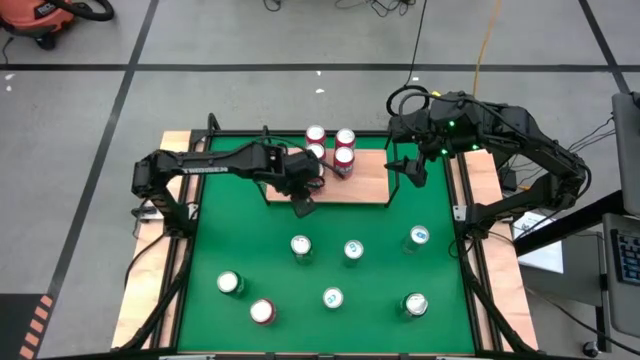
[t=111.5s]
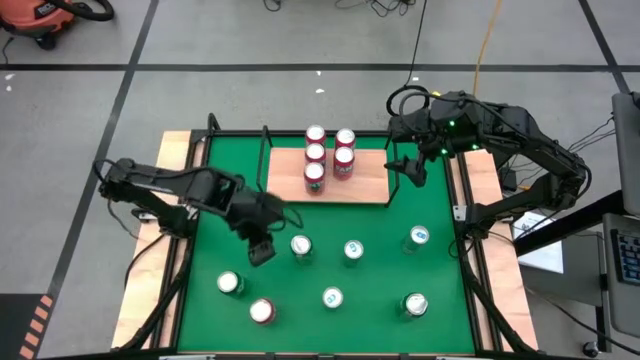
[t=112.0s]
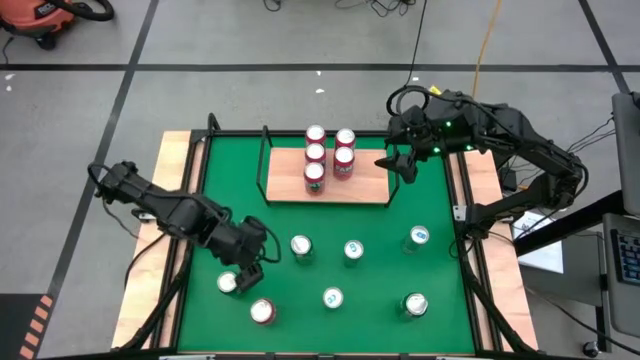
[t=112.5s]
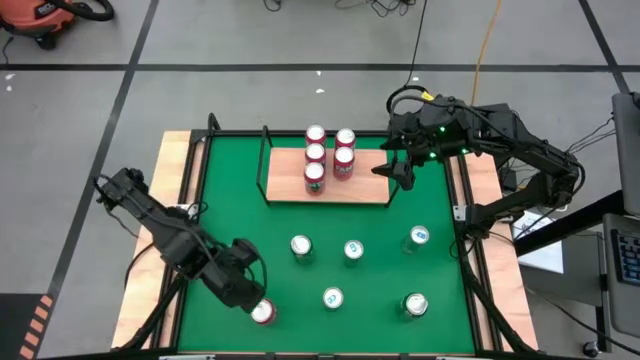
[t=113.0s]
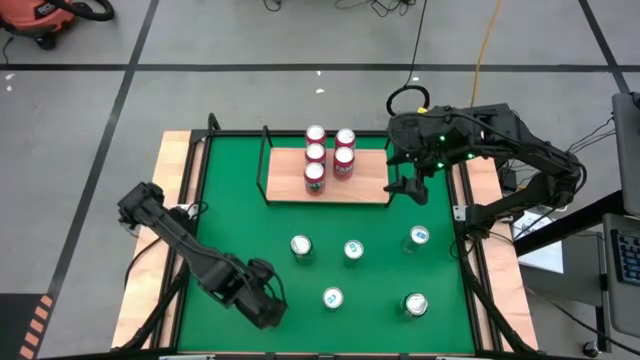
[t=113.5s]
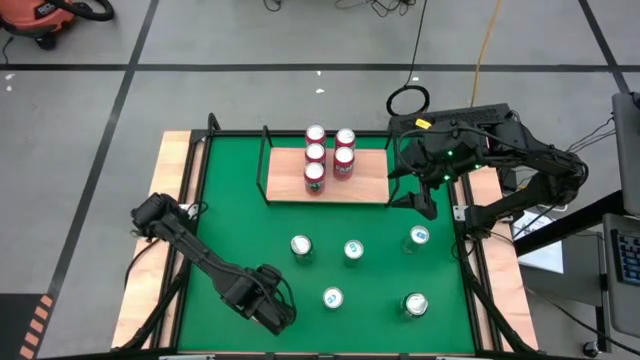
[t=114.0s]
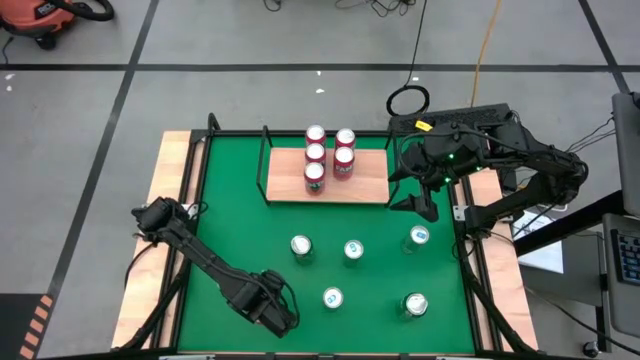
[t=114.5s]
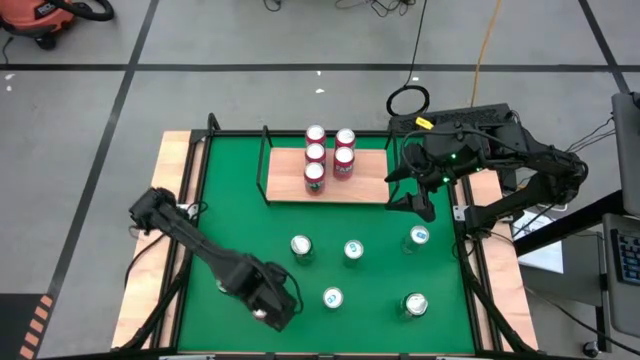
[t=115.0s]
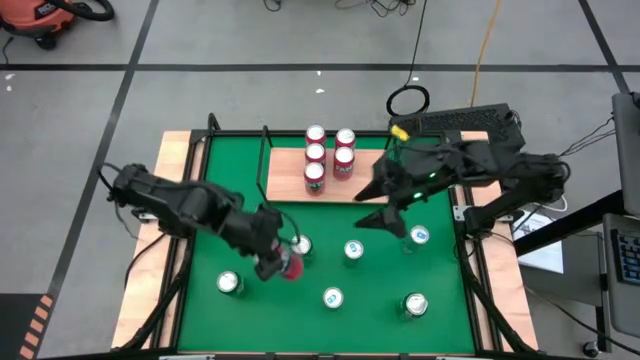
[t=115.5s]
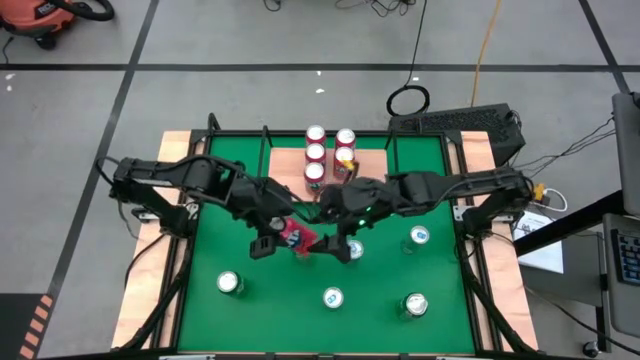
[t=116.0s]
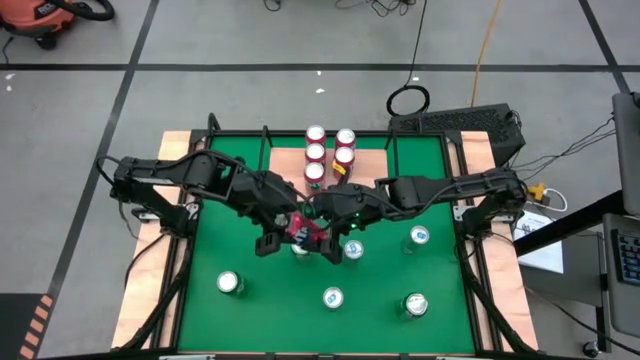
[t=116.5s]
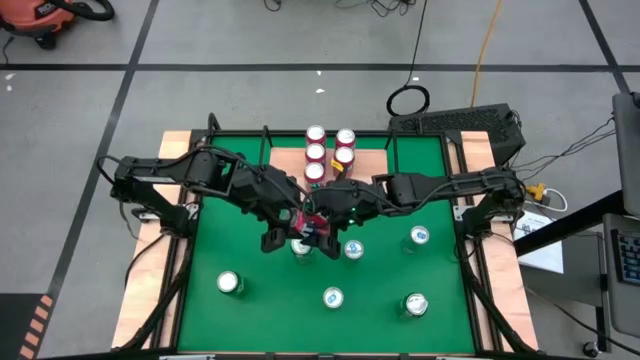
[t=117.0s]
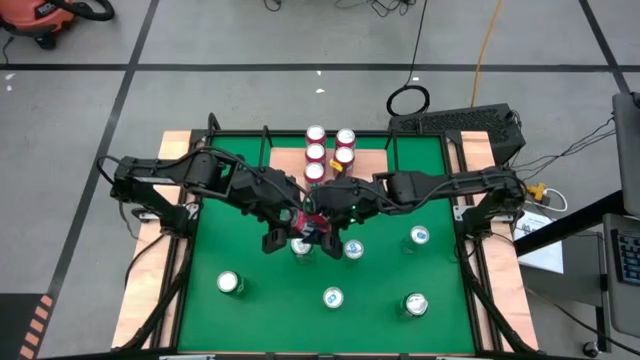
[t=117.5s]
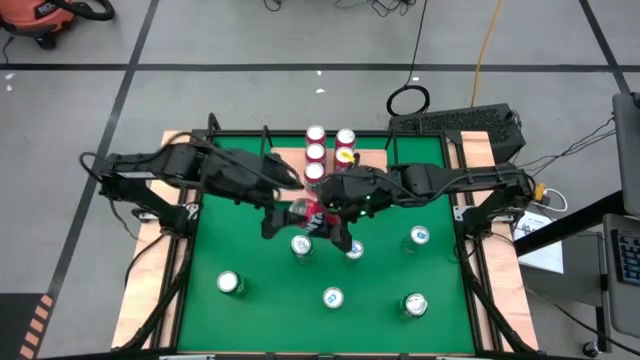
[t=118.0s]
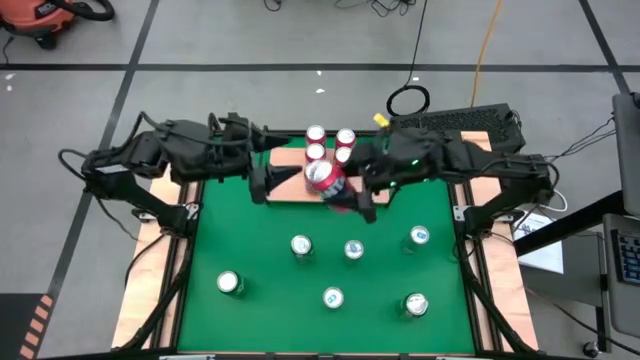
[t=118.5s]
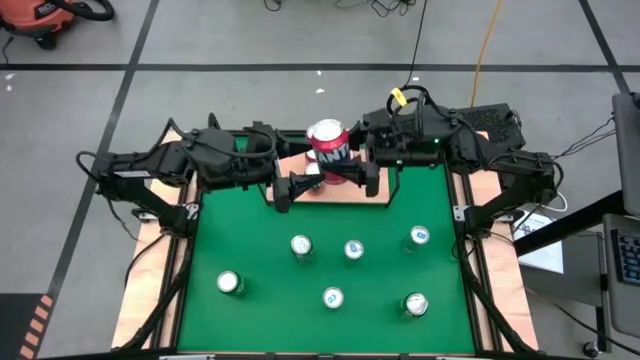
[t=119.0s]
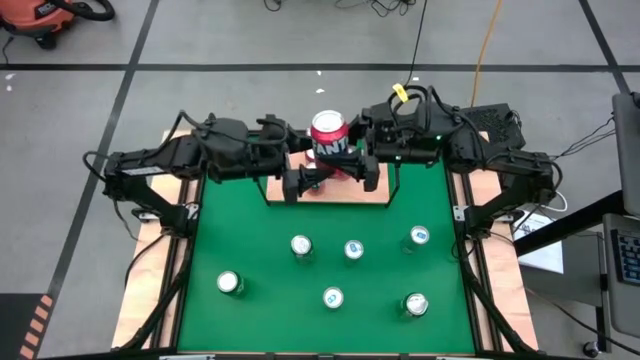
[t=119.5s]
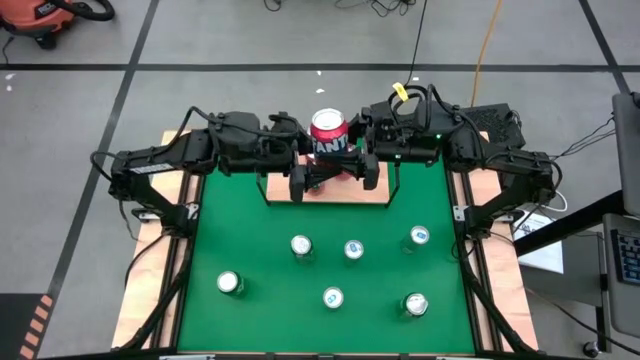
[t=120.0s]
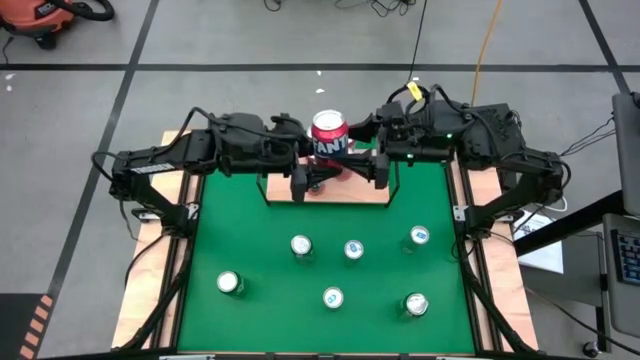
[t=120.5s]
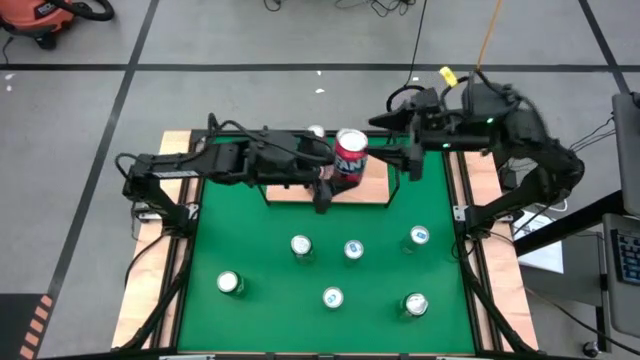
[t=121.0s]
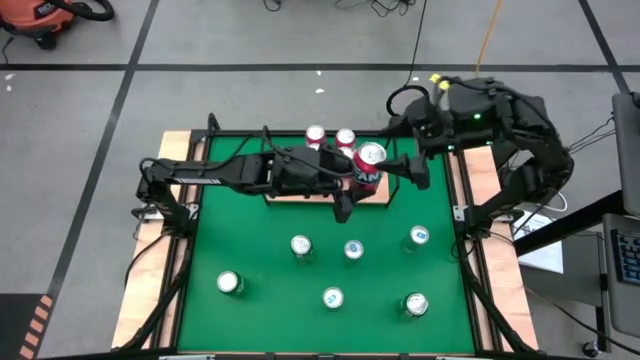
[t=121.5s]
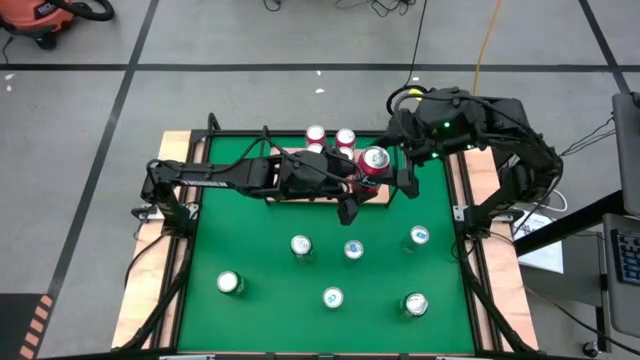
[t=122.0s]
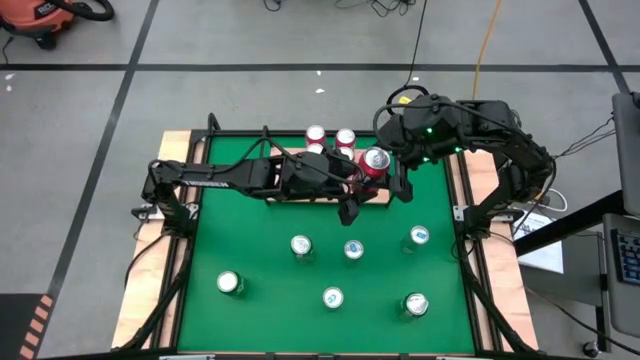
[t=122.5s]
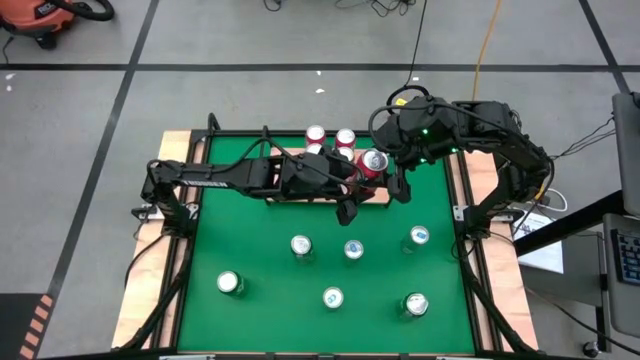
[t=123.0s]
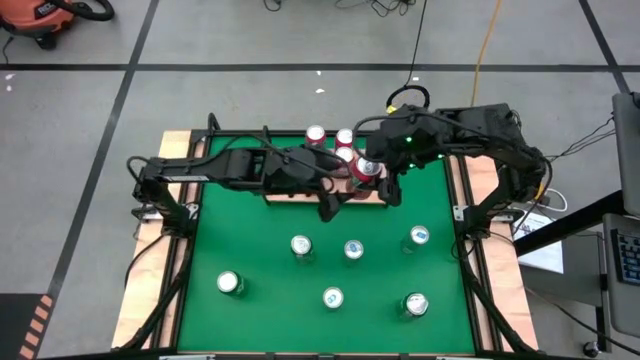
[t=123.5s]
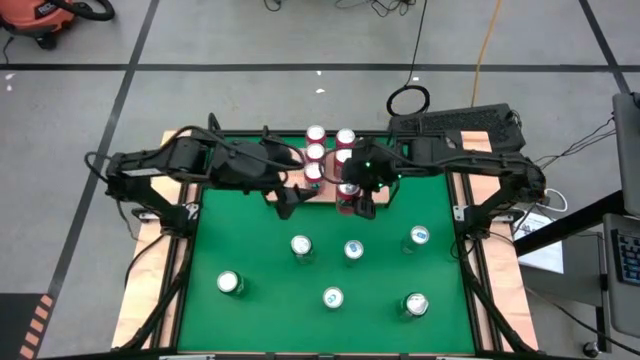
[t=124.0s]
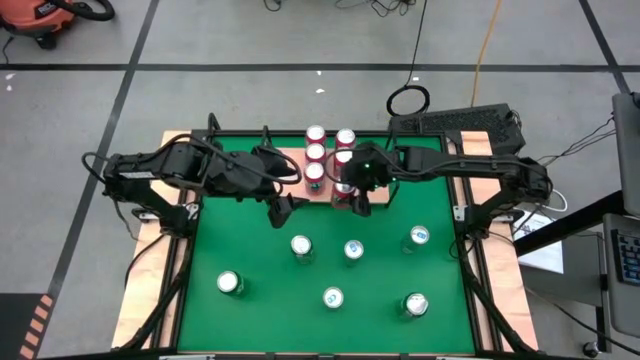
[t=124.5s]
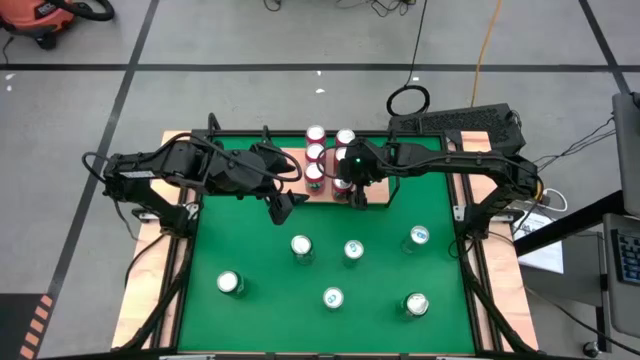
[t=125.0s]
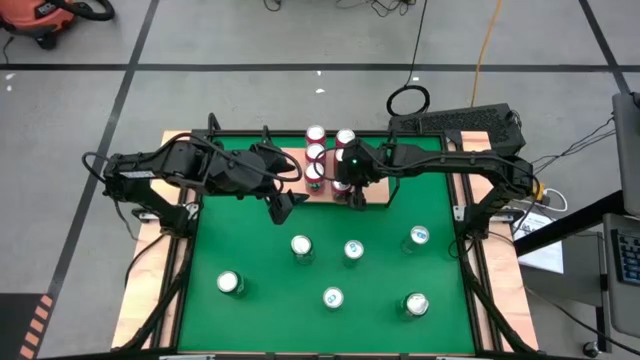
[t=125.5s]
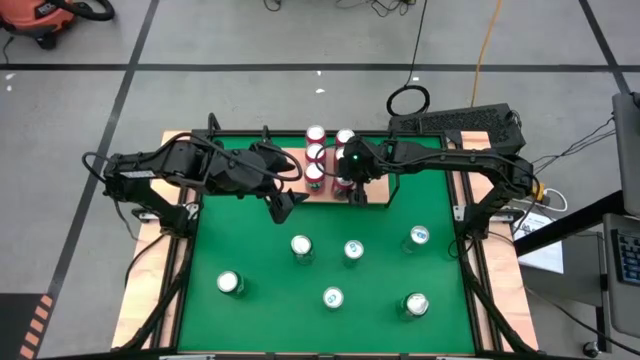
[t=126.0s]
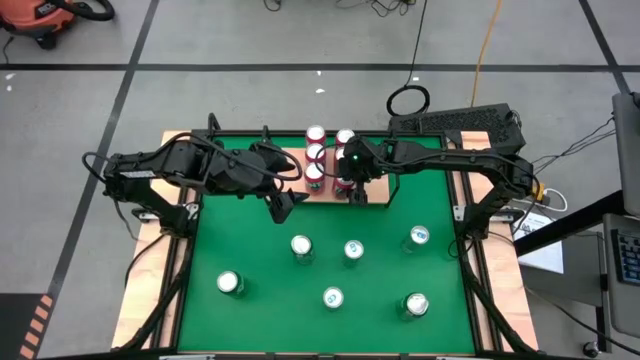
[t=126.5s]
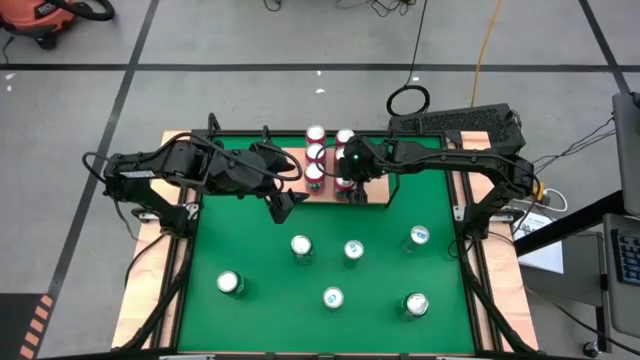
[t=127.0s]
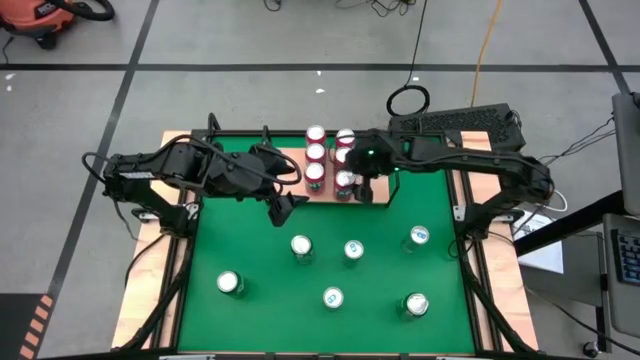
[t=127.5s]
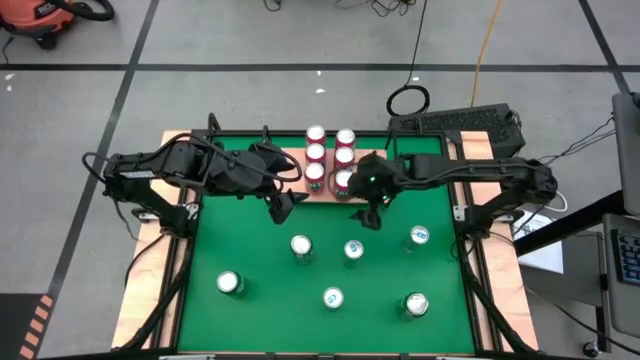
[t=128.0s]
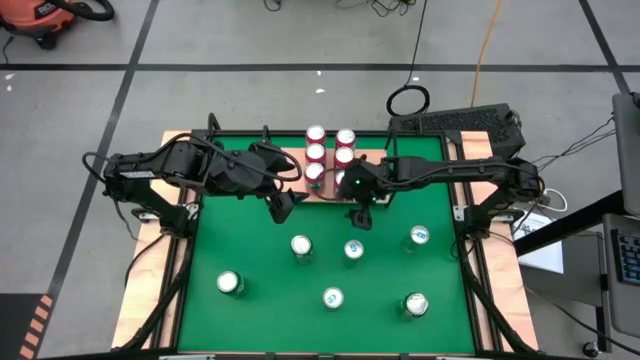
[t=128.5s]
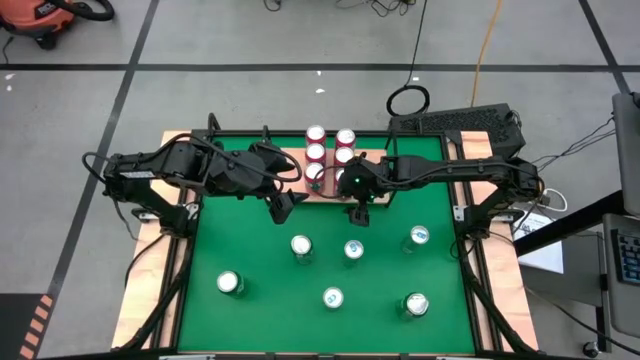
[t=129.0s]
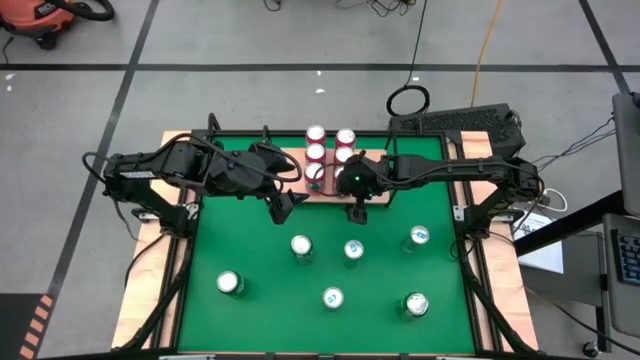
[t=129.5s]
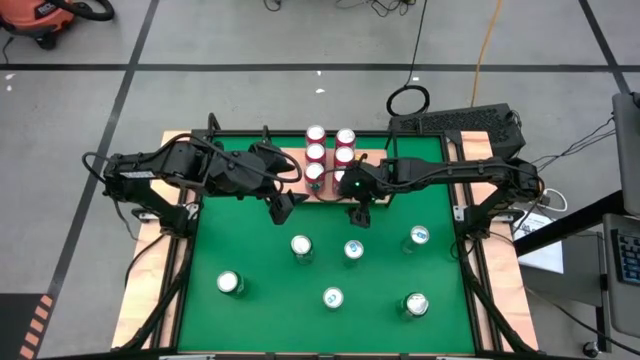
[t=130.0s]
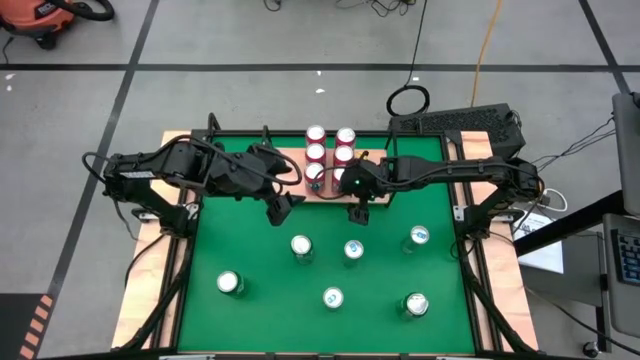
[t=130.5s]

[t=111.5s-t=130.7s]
Task: Place canned beverage on shelf
Put the red soda can on the shelf aligned with the other right red soda can

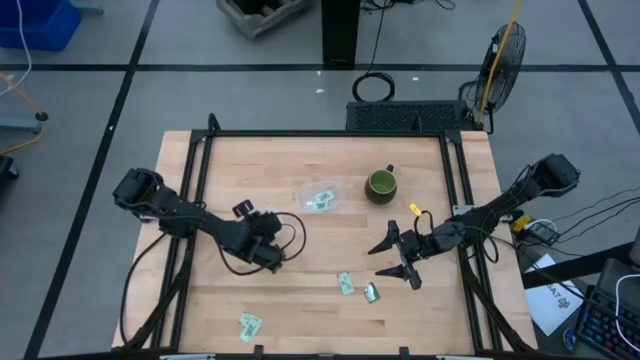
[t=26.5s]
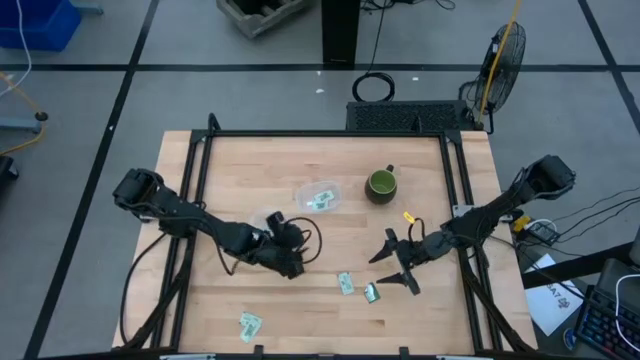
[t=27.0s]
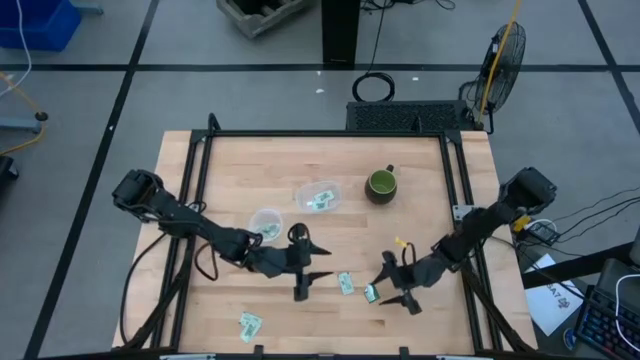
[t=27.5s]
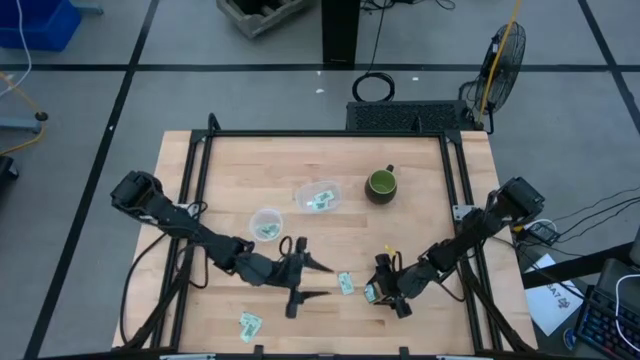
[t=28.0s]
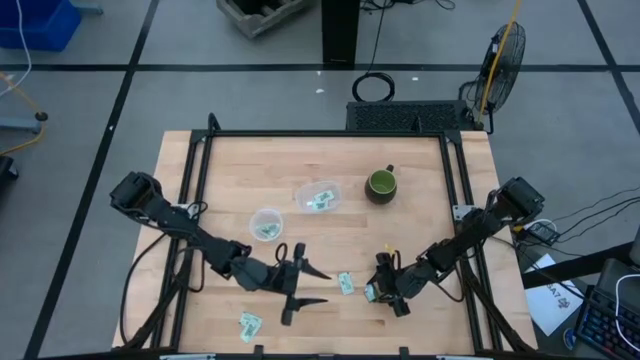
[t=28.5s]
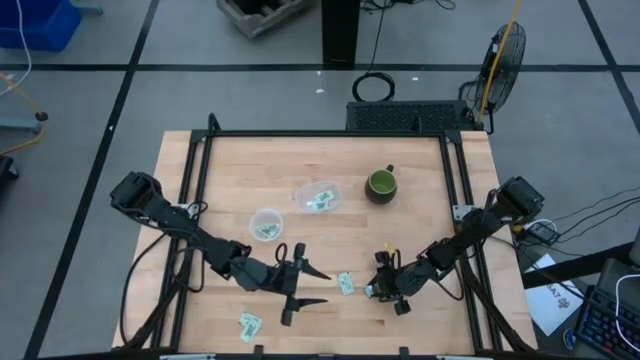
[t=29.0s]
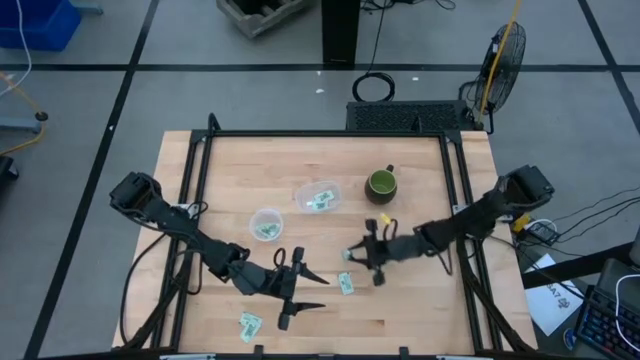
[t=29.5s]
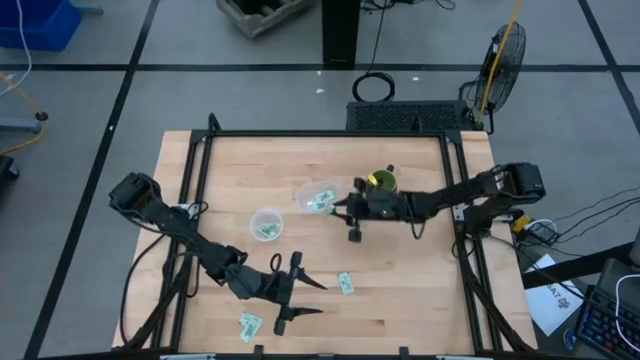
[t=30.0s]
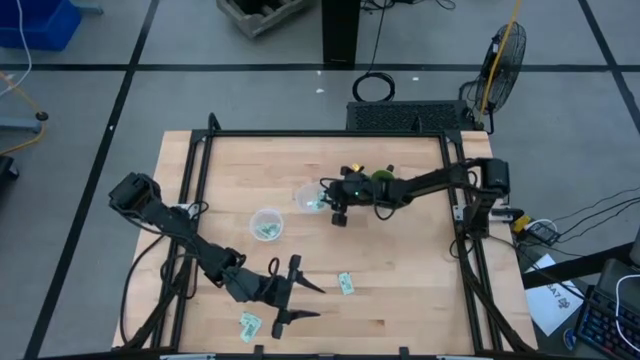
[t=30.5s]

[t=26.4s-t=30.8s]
Task: Pick and place Stevia / Truvia into bins
Put the truvia packet into the oval container
